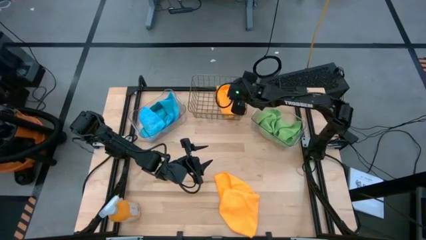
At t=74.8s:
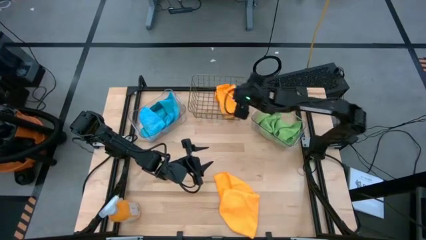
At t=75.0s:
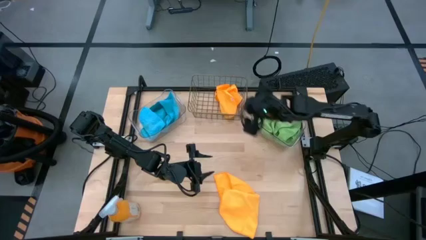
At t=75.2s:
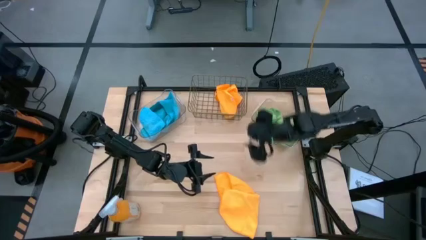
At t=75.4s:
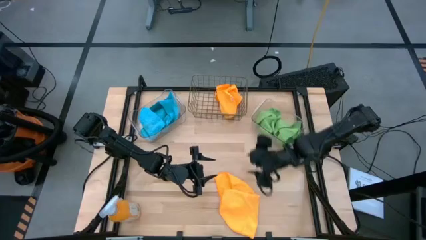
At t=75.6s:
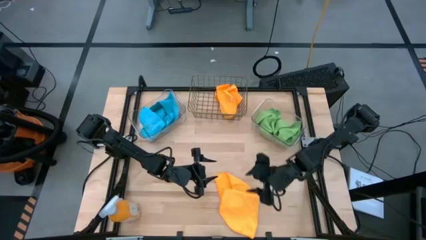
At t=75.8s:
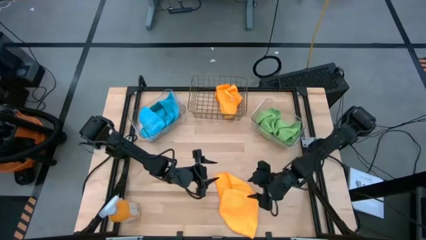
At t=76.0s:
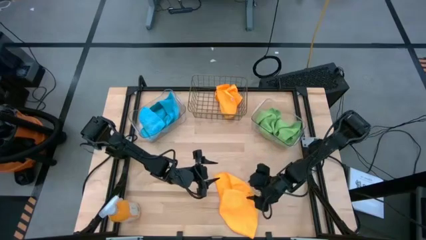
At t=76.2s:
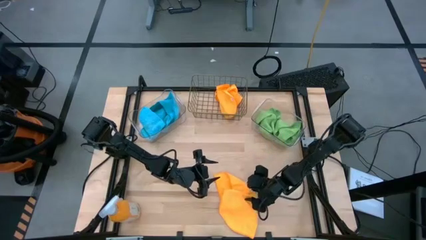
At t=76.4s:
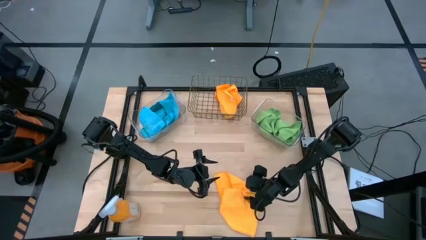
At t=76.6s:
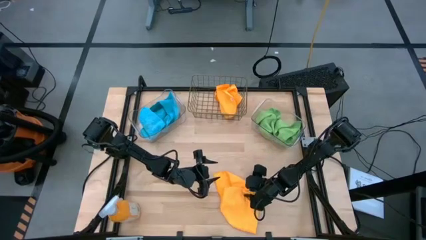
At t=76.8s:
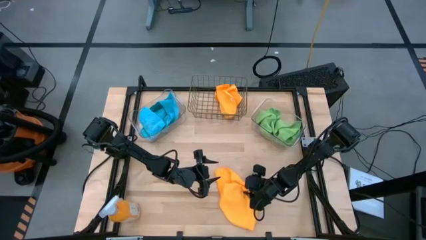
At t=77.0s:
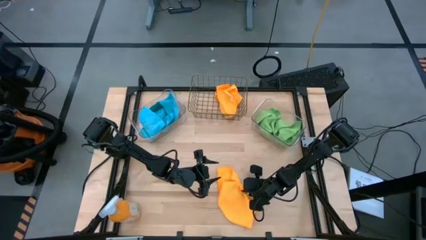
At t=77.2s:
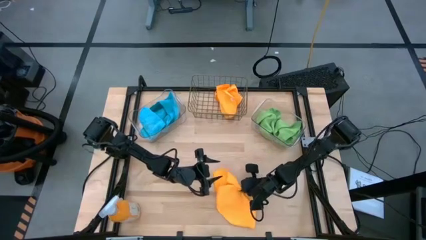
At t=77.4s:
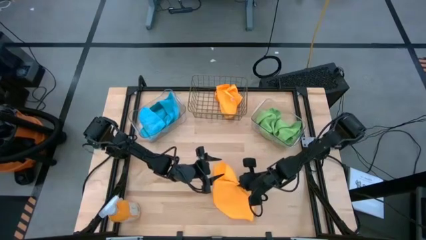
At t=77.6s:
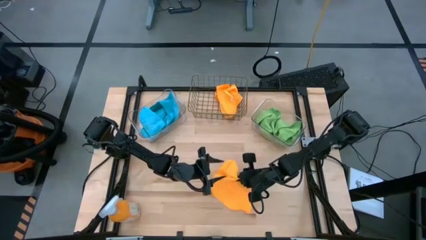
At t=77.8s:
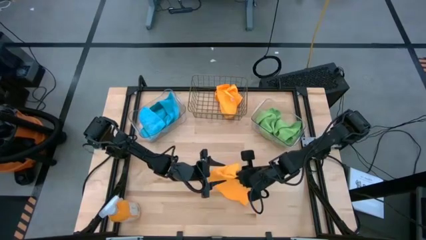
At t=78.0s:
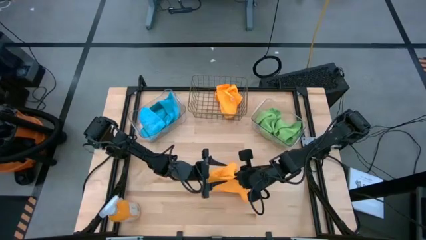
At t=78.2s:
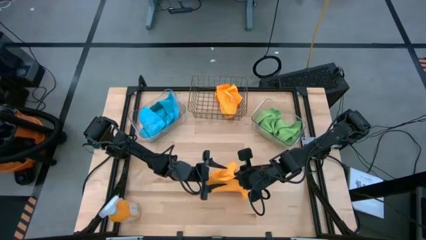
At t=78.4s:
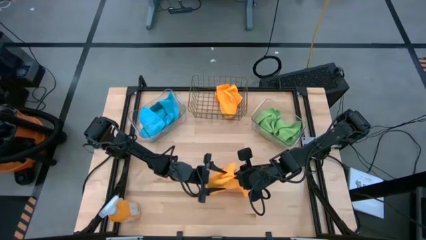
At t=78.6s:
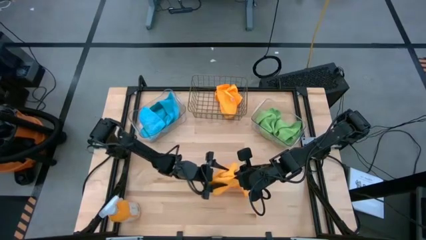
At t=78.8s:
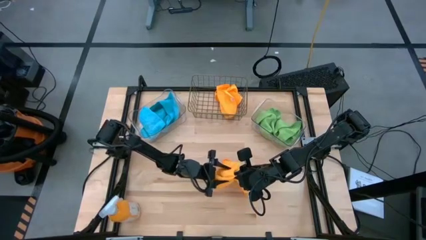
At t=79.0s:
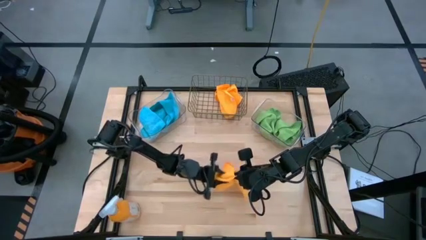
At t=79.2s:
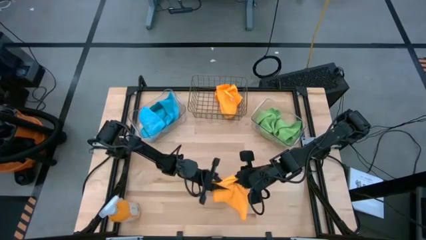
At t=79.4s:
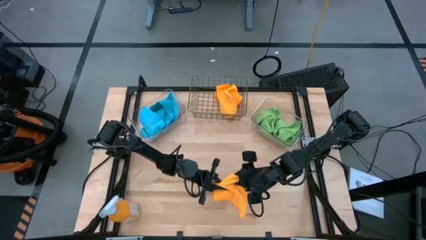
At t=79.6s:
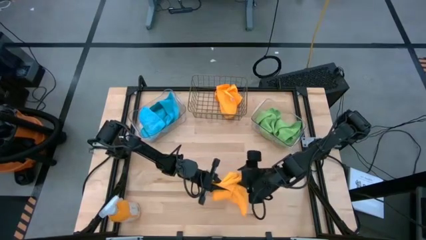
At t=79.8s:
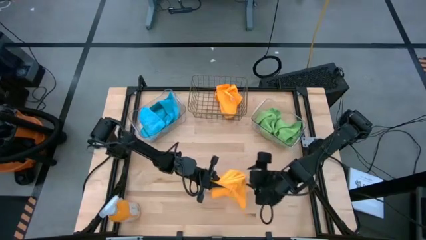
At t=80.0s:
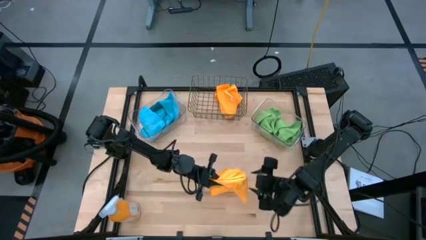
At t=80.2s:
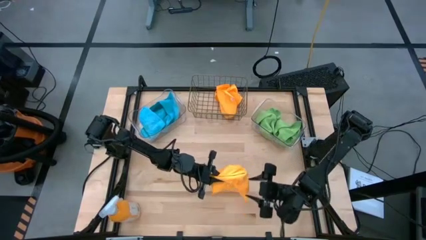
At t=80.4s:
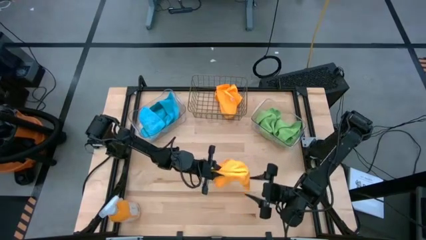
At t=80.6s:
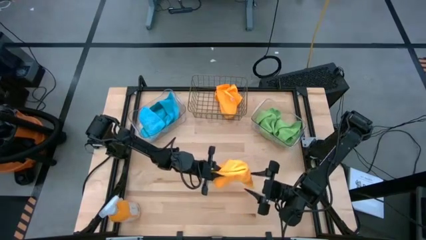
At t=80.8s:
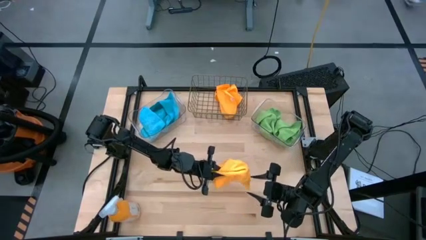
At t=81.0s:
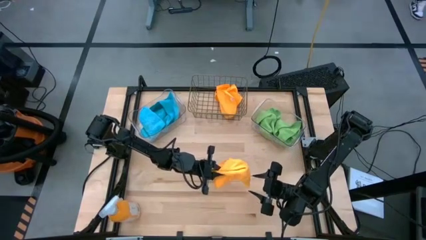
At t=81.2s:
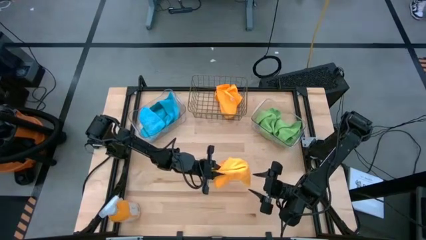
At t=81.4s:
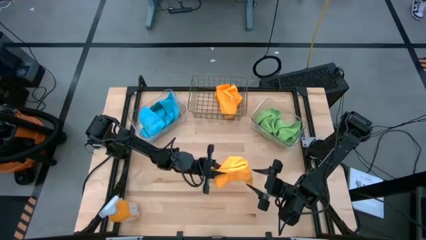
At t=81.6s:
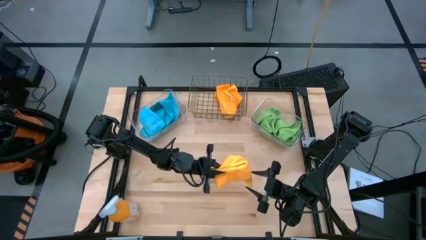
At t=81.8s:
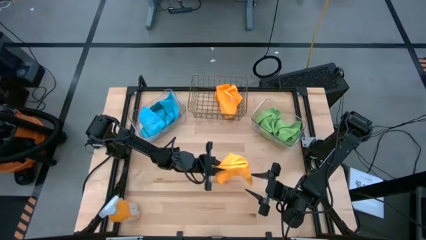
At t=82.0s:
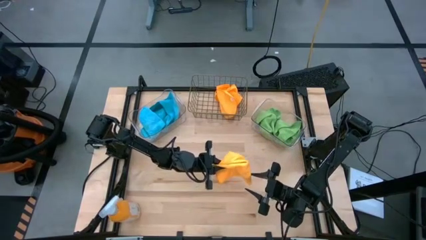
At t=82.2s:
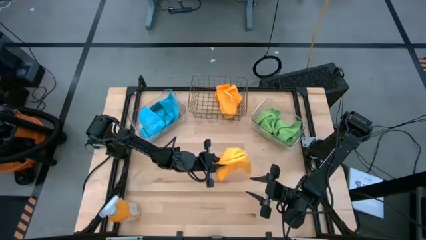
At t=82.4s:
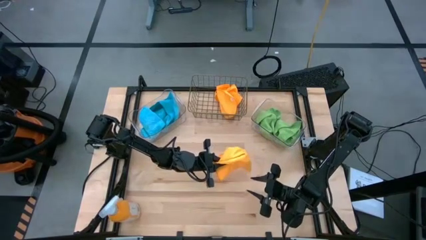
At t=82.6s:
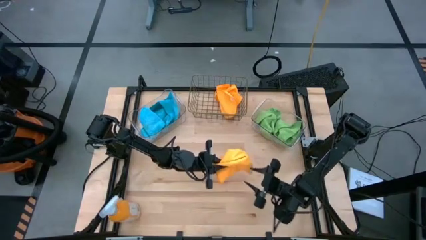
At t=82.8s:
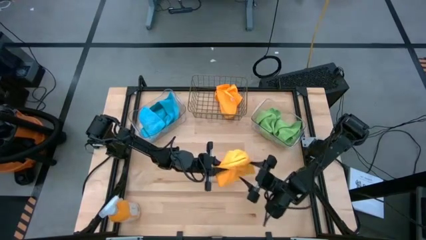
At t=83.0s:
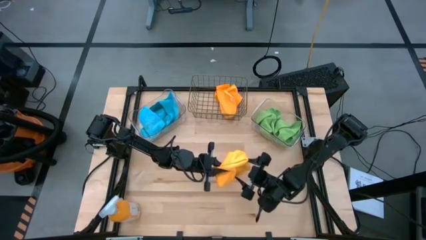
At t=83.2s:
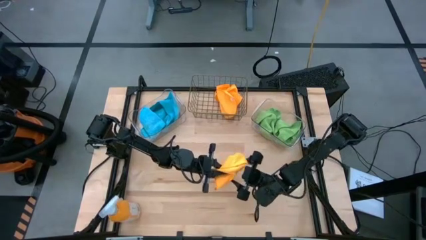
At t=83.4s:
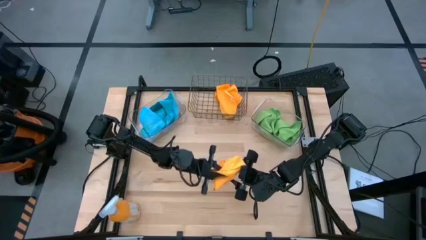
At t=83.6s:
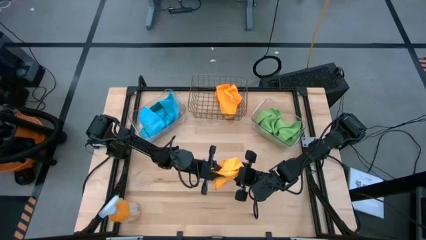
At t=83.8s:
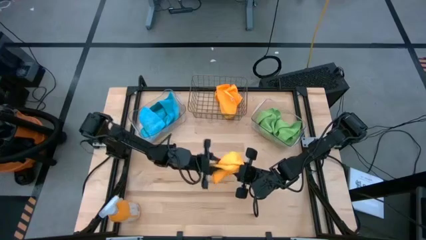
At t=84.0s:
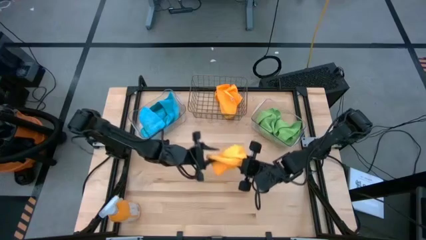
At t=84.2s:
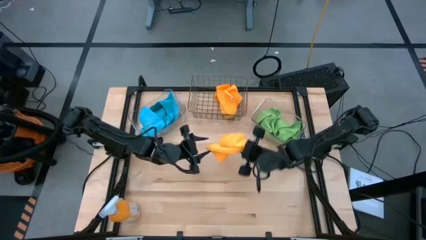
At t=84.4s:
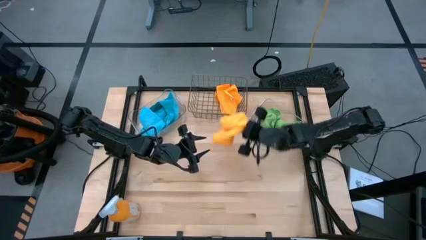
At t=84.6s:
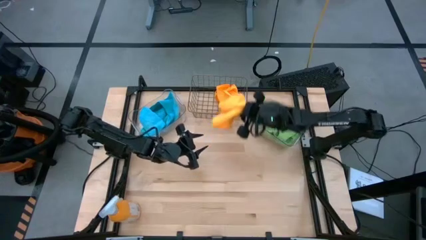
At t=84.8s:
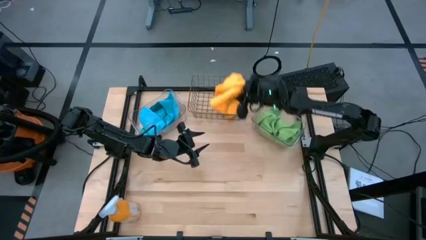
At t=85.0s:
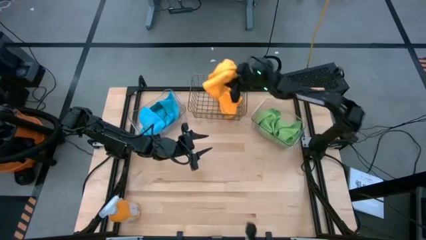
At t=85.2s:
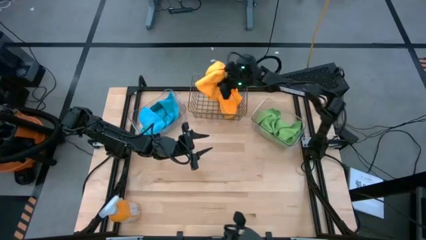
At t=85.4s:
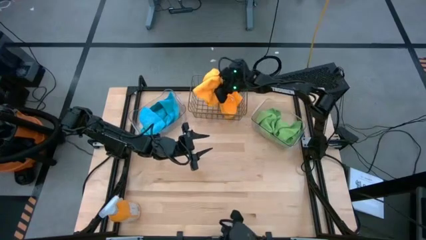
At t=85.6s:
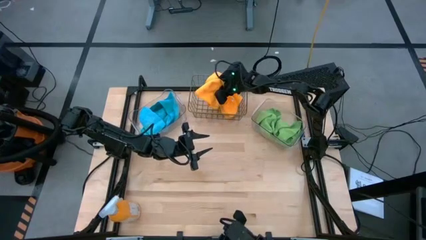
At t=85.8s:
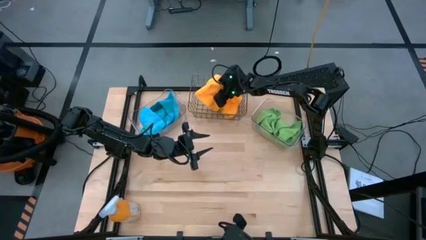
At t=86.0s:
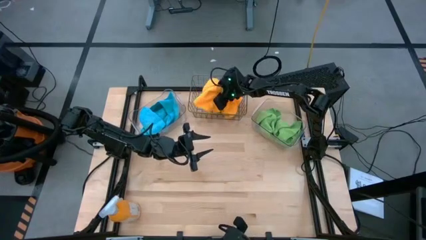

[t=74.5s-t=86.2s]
Task: Sort microfiber towel by color & place in baskets
Put the yellow towel into the wire basket
